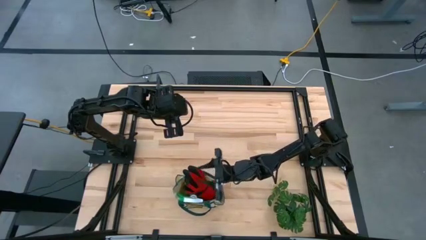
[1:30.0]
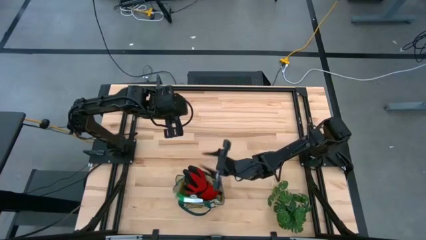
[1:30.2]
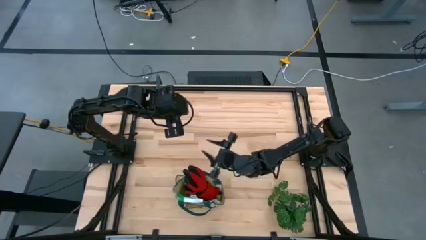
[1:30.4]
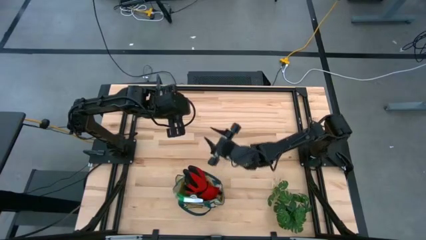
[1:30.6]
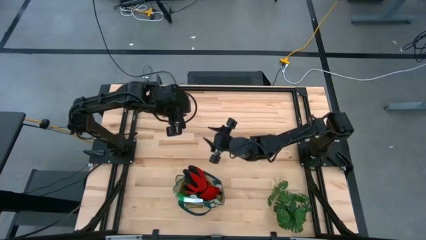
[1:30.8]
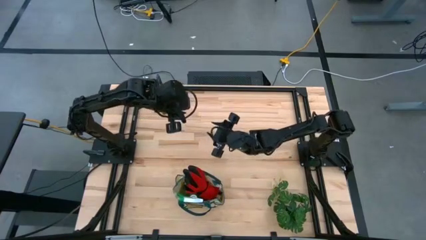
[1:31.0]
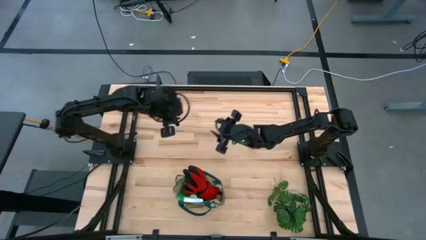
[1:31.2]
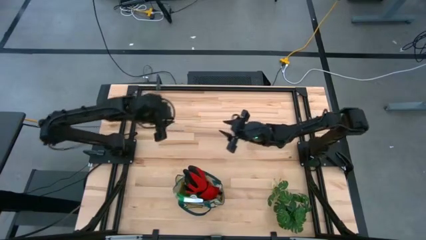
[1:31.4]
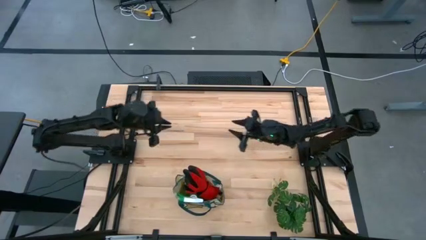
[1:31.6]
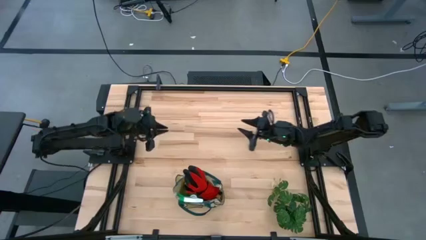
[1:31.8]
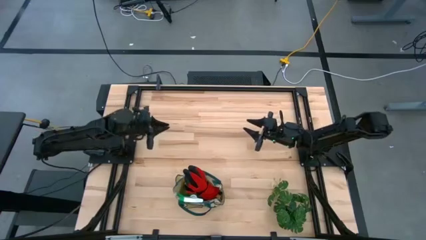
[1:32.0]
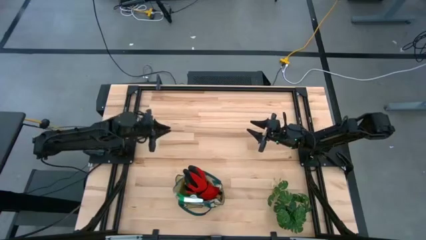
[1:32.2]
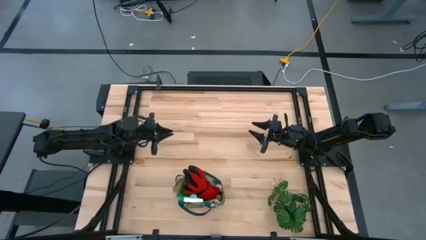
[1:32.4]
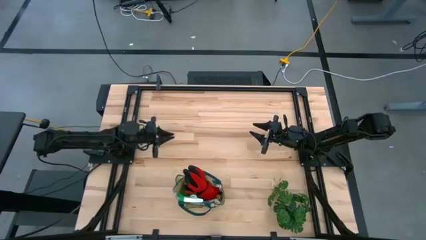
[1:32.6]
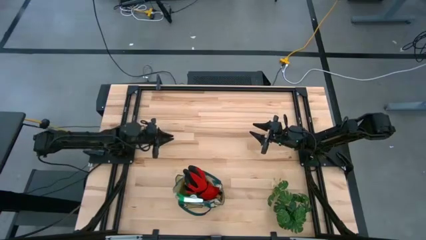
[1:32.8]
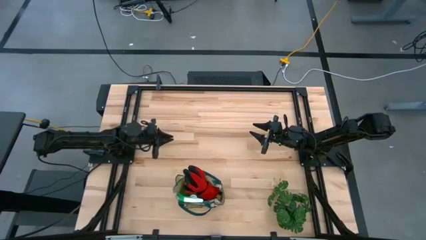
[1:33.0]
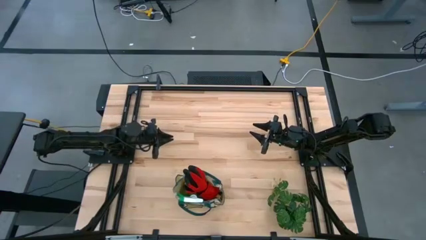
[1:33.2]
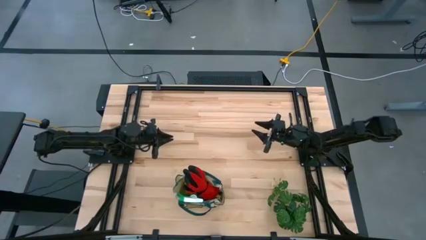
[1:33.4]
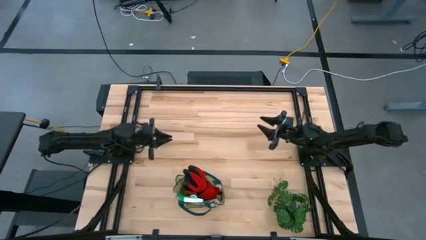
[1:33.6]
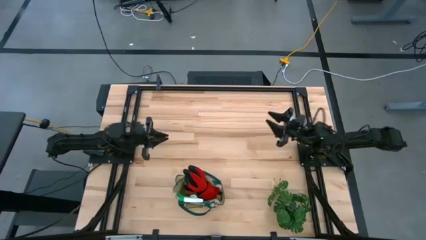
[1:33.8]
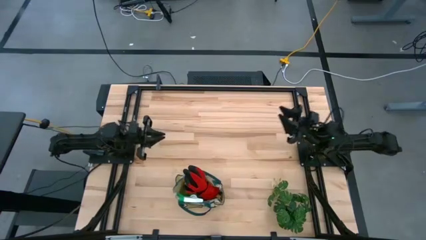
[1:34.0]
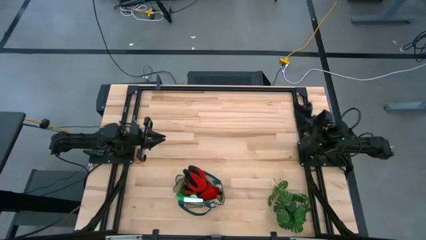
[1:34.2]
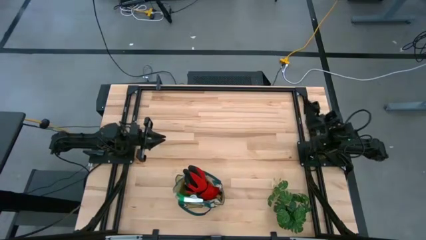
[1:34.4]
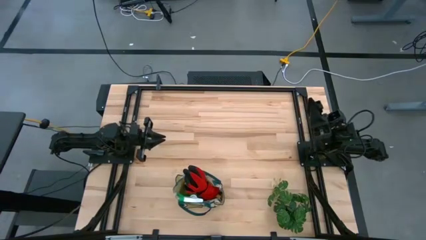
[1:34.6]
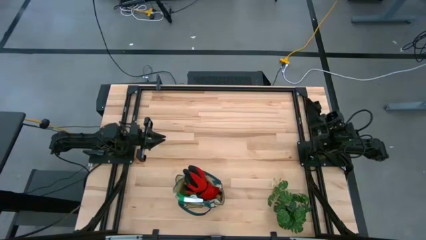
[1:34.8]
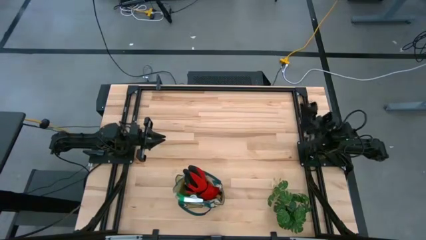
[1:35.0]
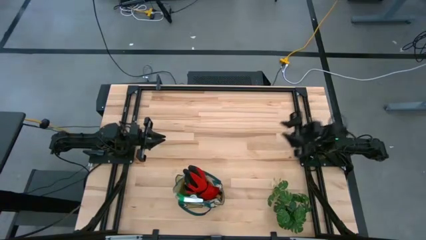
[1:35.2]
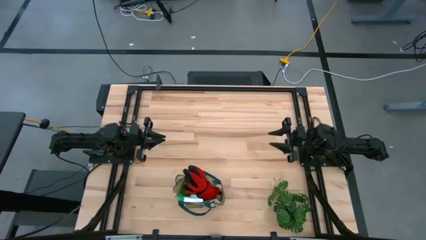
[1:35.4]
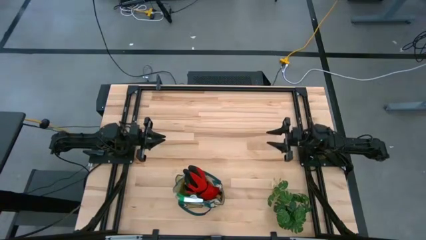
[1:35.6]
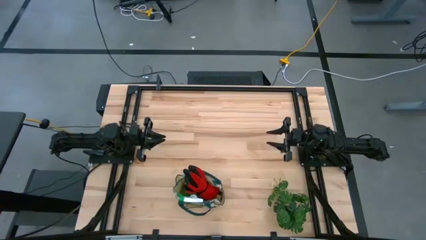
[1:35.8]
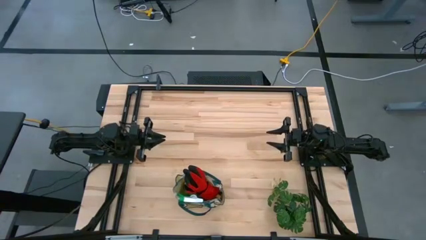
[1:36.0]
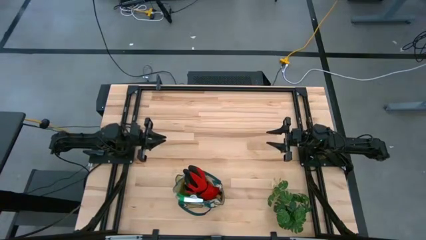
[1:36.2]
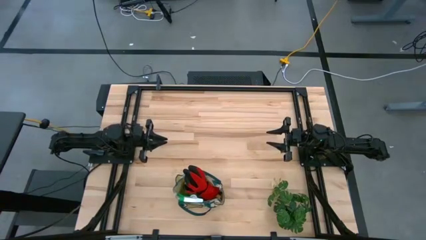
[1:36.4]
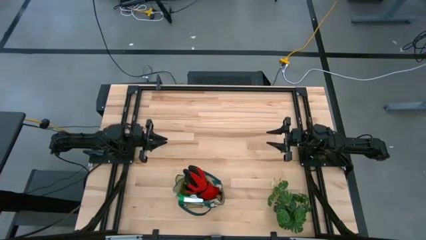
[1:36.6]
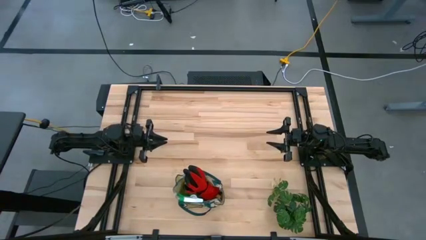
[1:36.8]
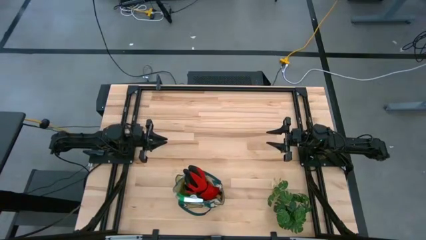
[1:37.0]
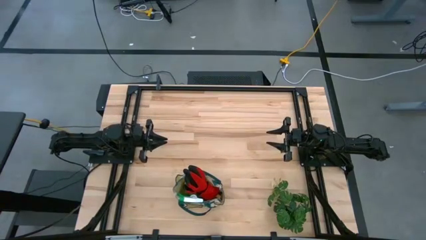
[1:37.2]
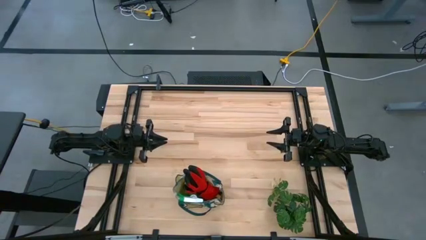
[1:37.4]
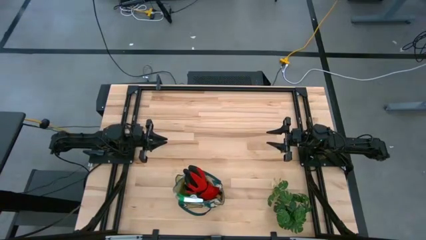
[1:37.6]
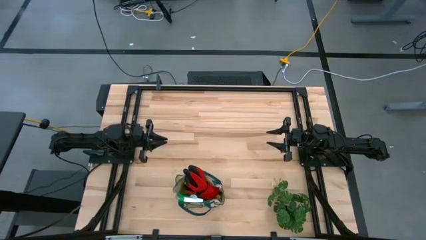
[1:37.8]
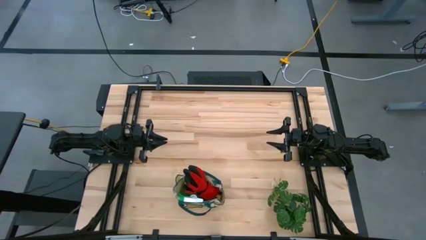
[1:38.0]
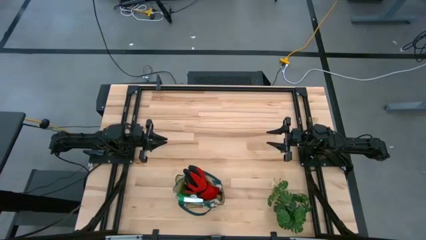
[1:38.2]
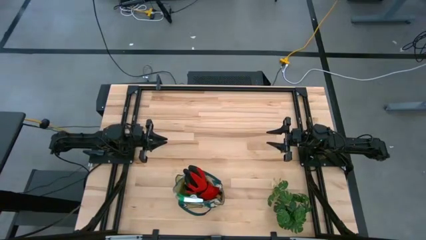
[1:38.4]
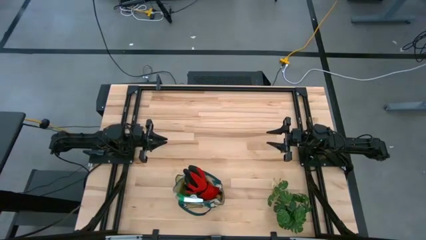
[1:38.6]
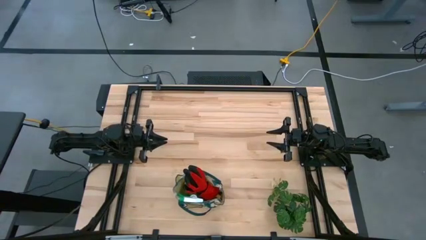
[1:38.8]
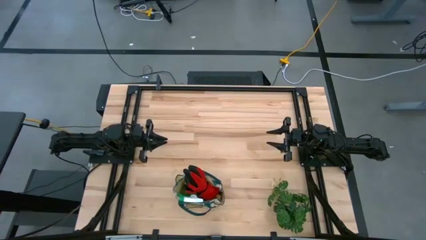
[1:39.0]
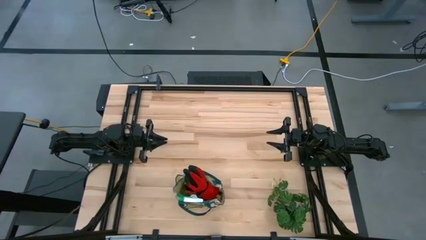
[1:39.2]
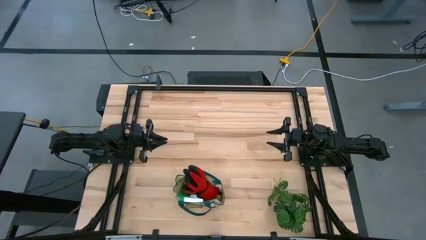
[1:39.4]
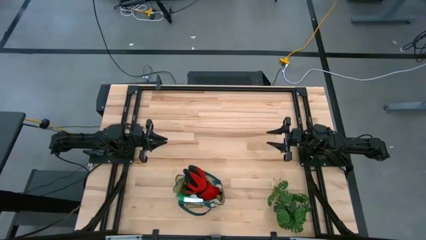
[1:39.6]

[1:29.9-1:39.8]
Task: Pick & Place Garden tools in Gardening bag
Return to Home Position
